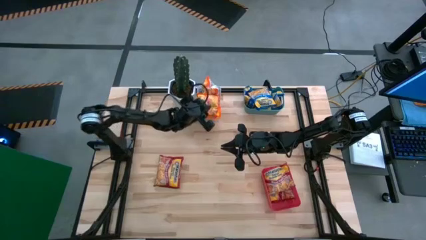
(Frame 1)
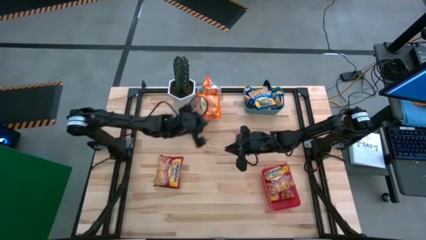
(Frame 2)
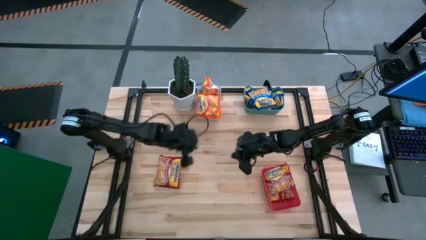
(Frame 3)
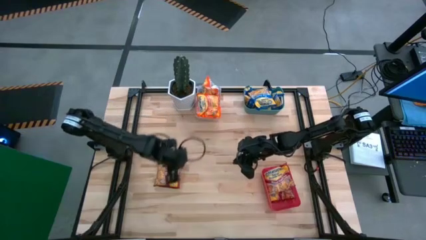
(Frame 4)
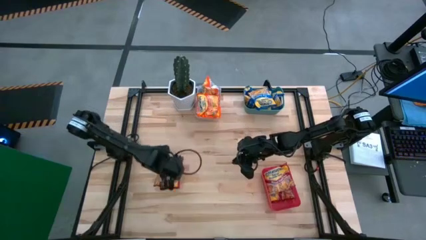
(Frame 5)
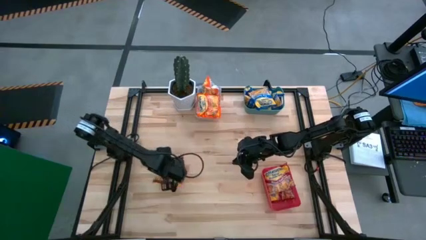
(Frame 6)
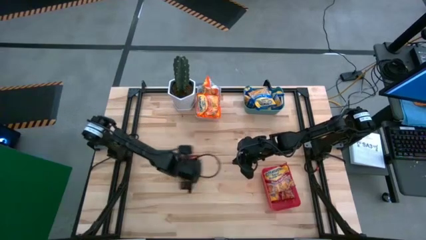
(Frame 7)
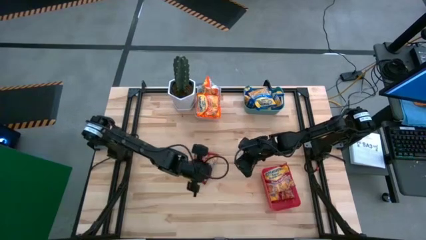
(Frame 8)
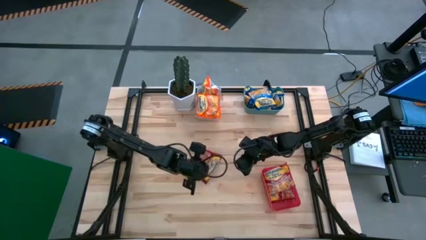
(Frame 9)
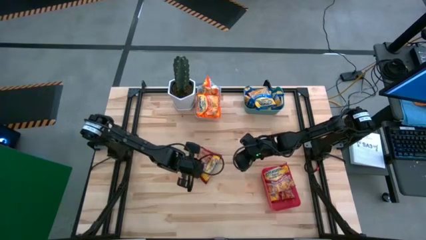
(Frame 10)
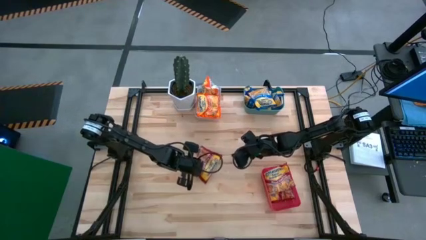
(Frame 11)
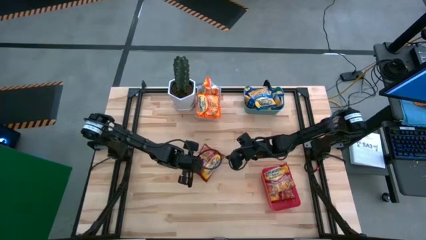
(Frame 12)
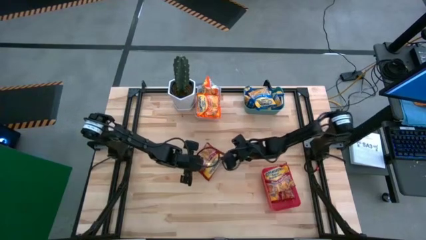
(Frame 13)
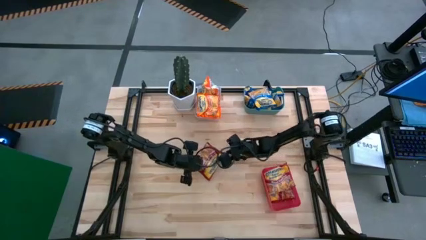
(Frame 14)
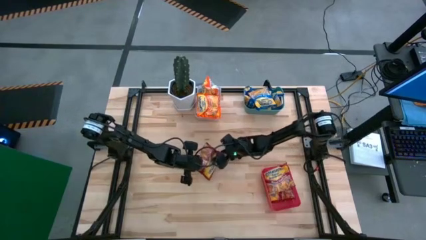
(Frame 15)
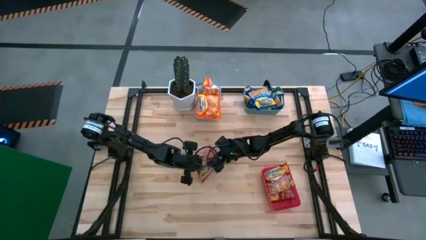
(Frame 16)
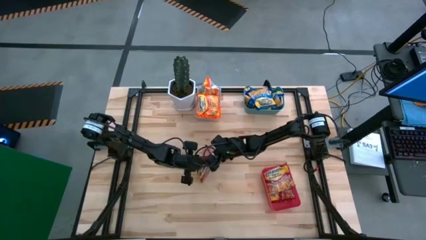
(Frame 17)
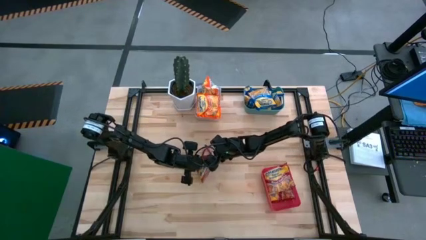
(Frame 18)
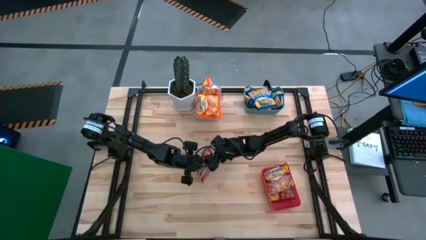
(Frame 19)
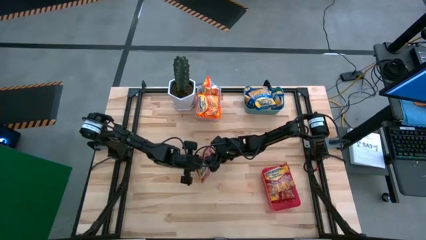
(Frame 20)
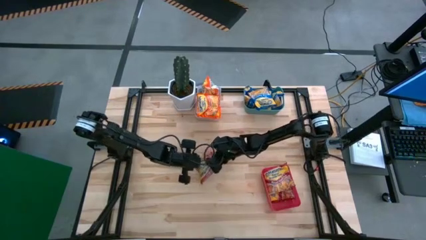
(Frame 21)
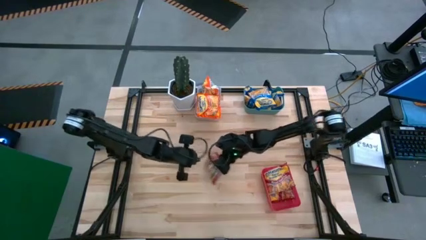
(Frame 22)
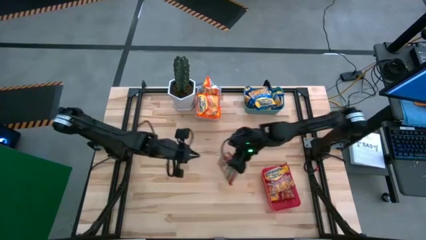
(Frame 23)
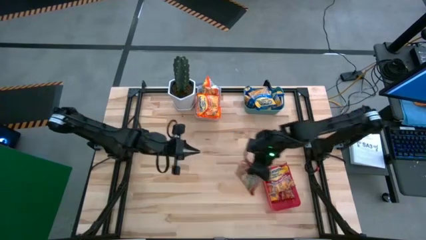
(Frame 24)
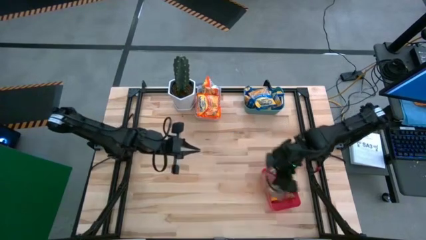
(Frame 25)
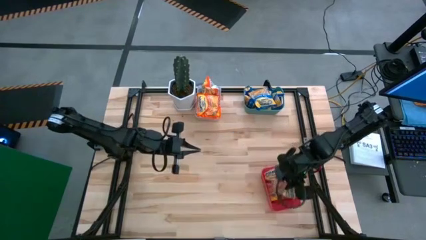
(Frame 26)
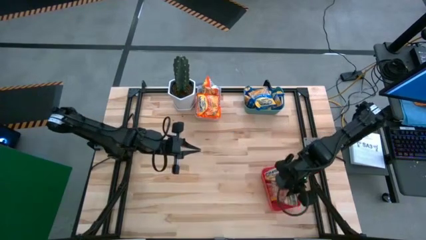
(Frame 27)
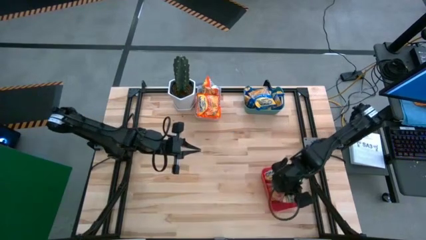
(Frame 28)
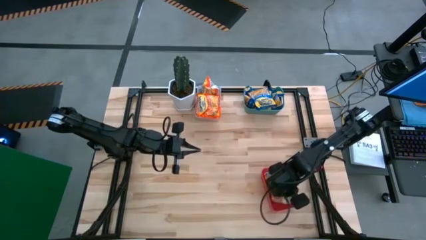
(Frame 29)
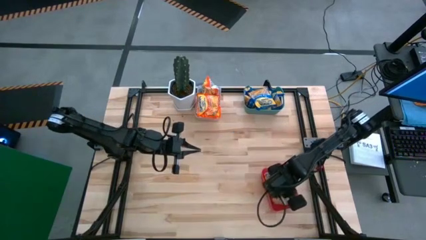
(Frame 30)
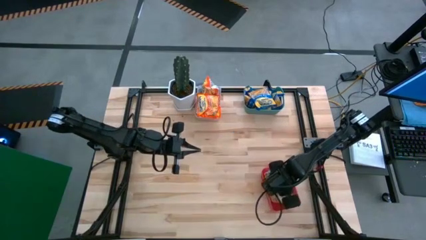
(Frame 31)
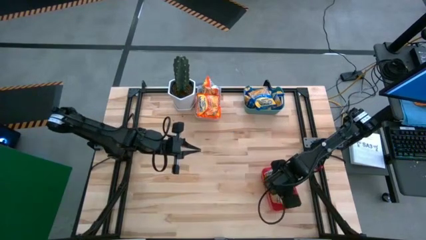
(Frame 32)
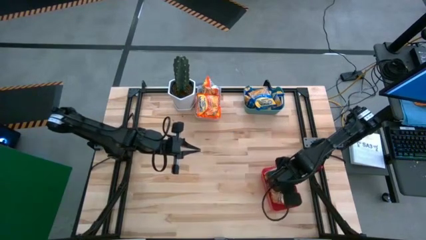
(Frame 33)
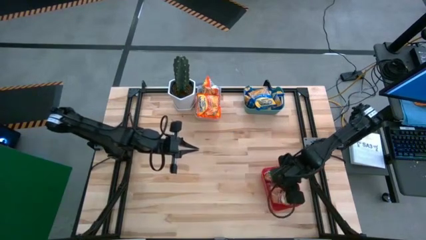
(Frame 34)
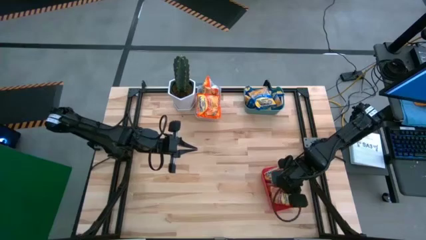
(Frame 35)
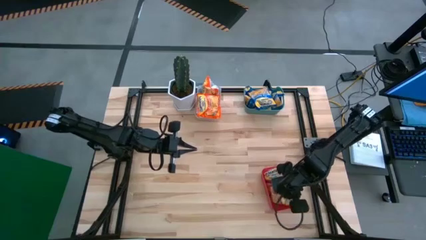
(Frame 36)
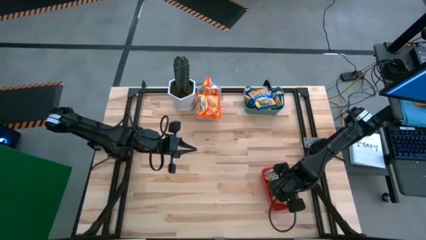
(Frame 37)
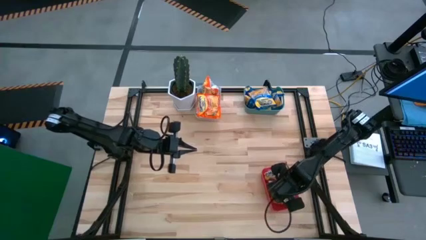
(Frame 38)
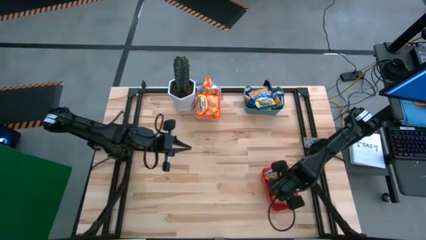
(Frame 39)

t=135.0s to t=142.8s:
Task: Sort Maruchan noodles
Put the red noodle pack into the red bin

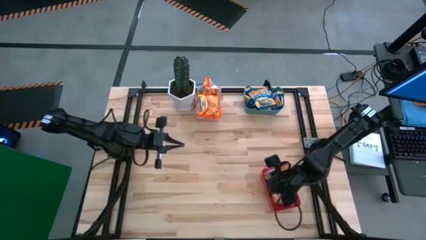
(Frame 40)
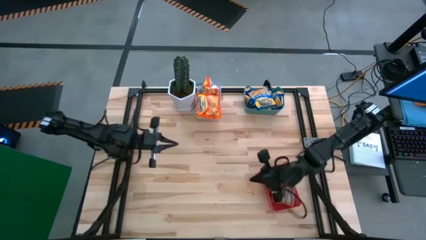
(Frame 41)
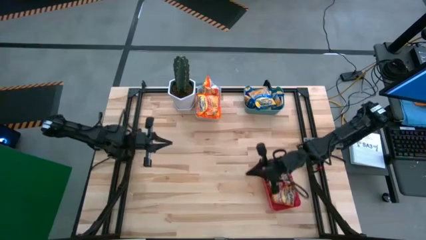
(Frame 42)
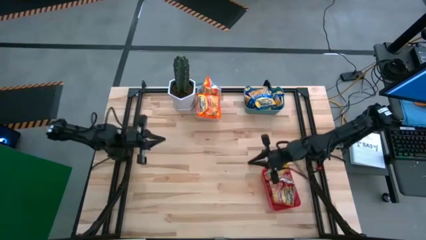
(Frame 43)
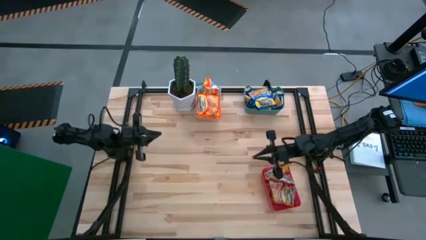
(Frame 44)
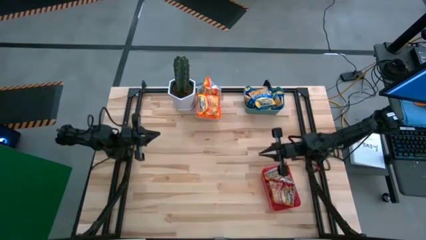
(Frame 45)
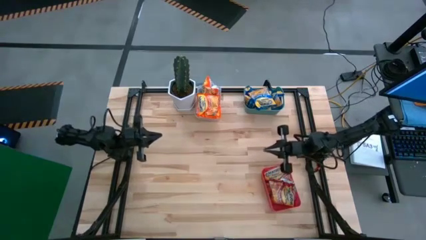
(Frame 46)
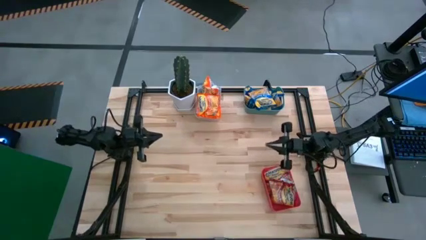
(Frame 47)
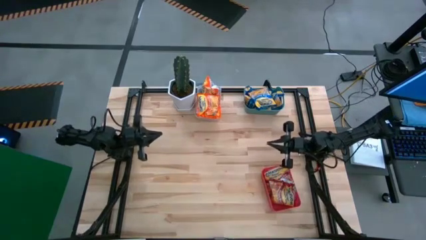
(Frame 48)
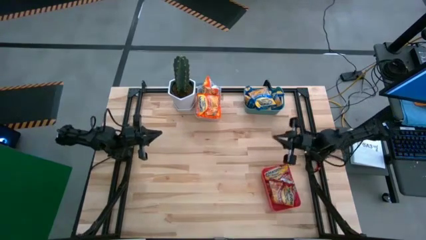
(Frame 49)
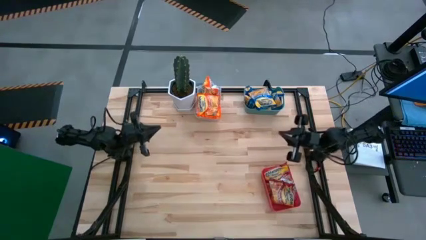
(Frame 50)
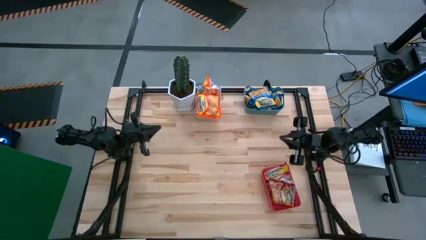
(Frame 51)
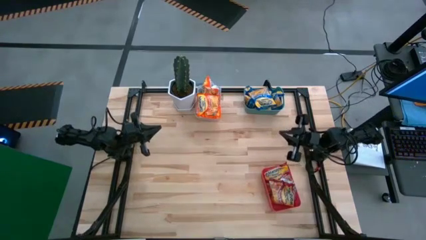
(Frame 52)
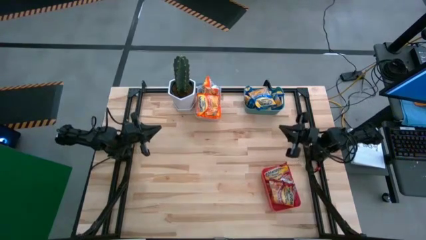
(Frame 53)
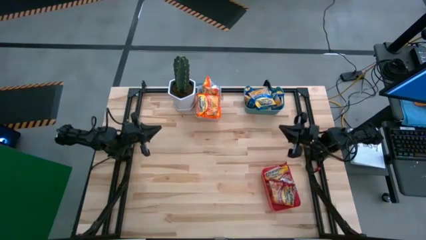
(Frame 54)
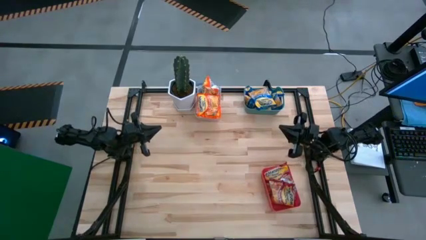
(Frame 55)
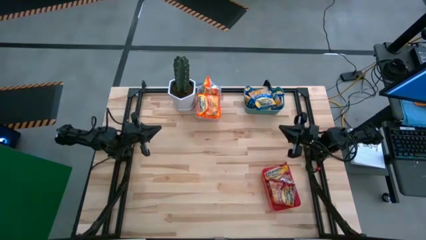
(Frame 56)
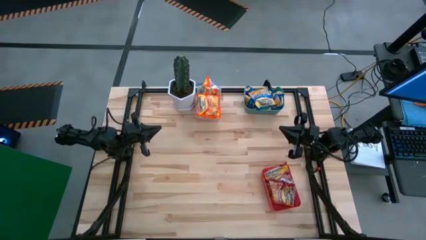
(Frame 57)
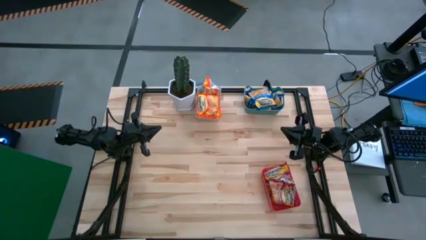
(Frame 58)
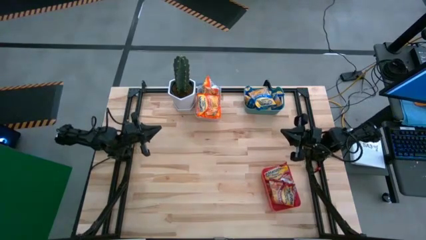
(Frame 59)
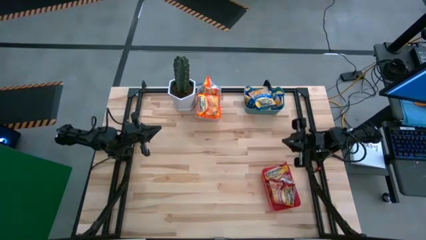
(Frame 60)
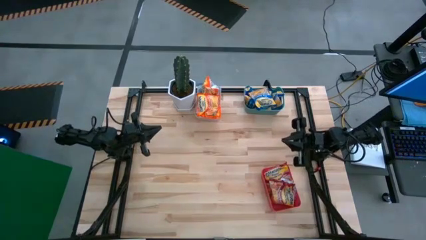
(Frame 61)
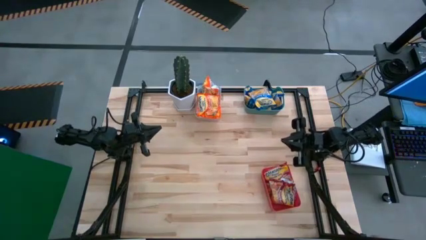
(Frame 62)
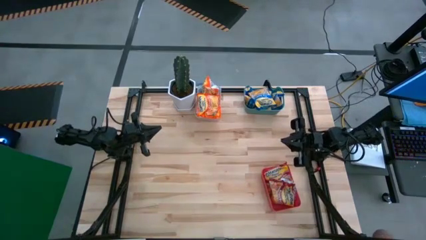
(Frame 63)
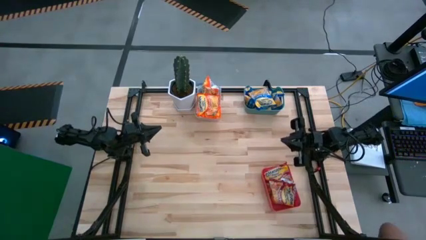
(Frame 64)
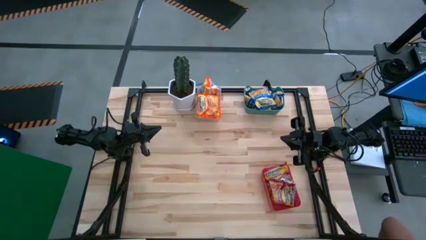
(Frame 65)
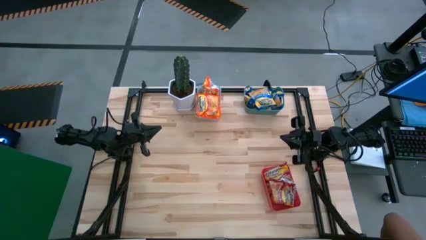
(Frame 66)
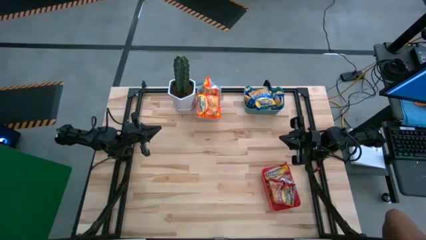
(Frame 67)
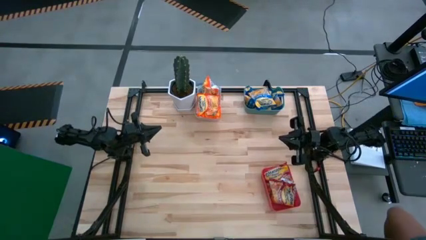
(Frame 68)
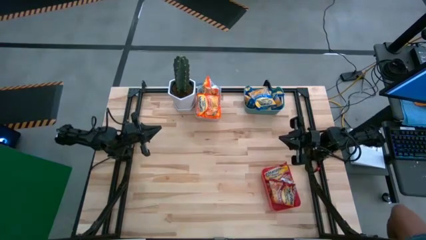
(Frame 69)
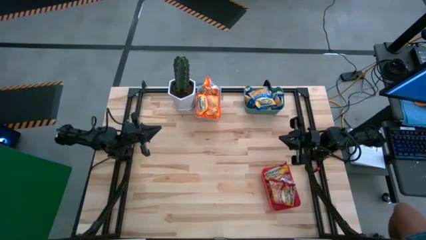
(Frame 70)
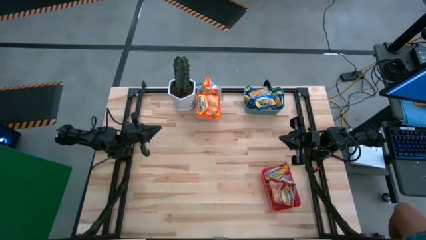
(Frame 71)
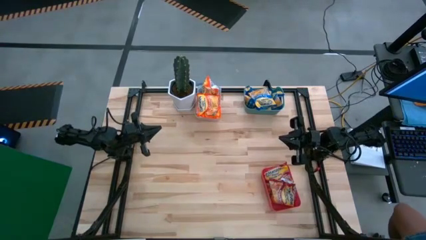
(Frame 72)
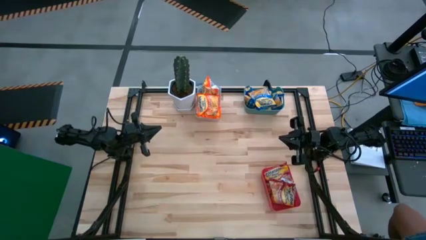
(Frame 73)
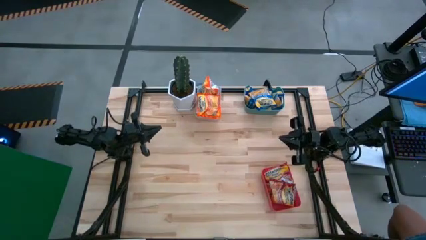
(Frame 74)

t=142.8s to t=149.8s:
Return to Home Position
